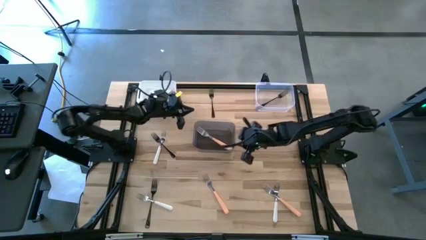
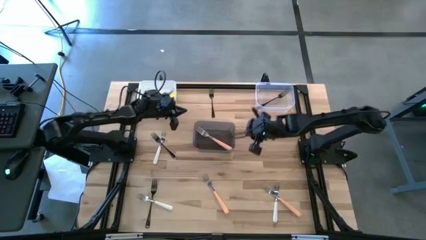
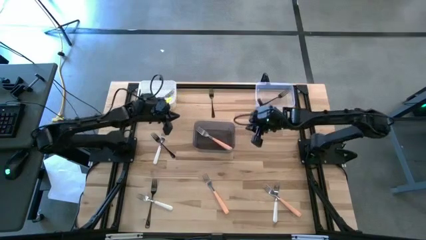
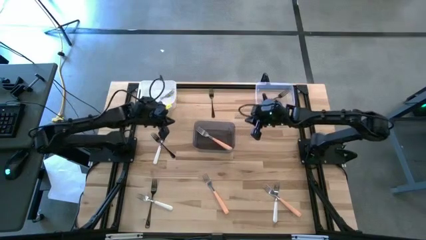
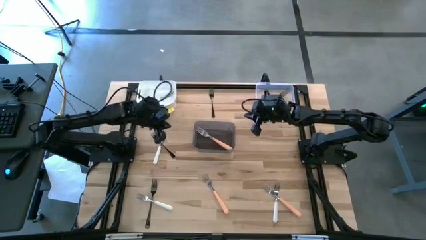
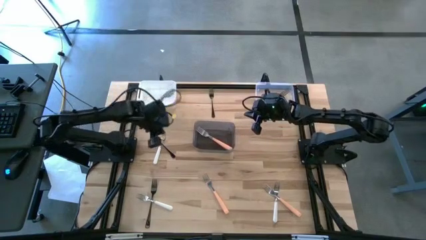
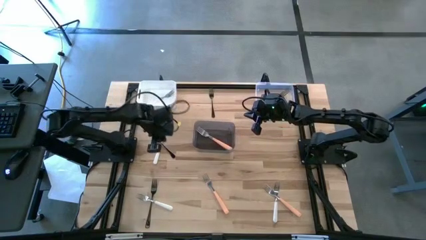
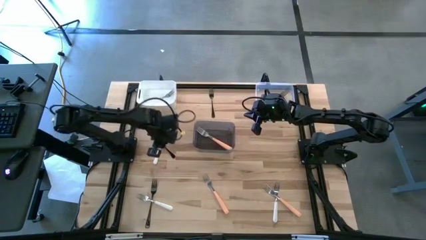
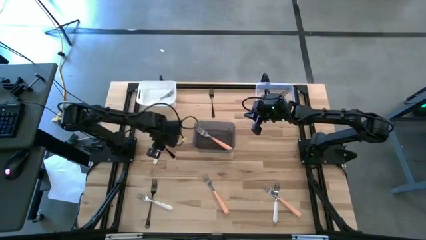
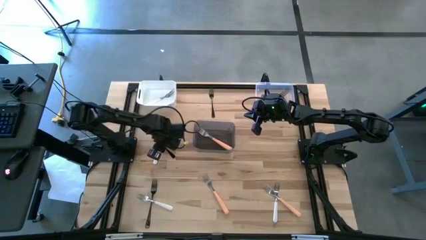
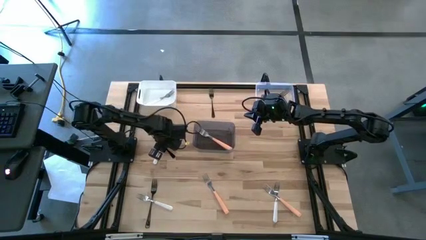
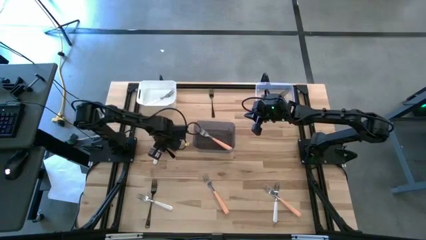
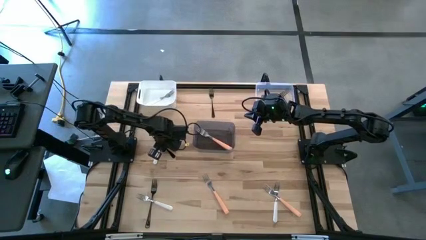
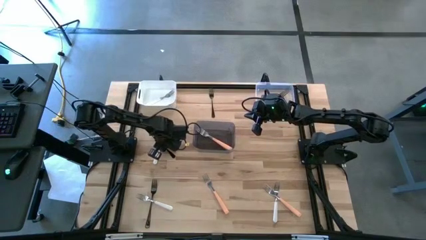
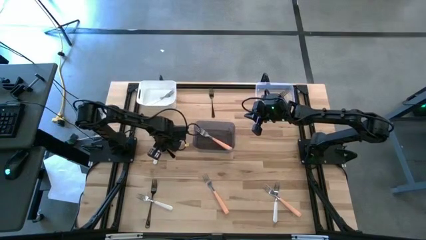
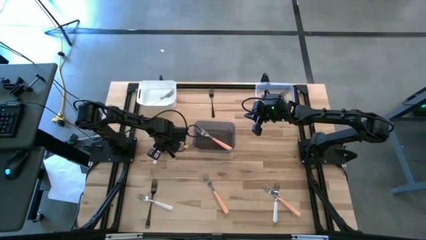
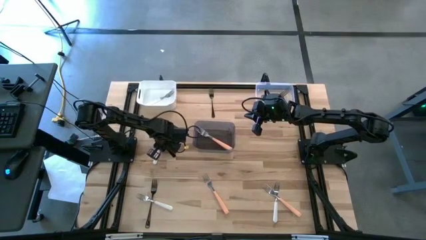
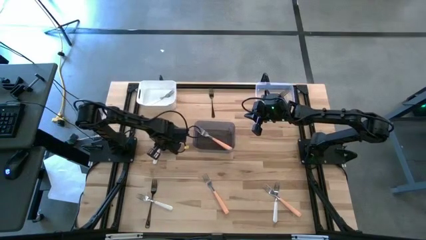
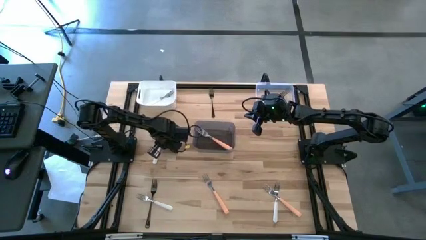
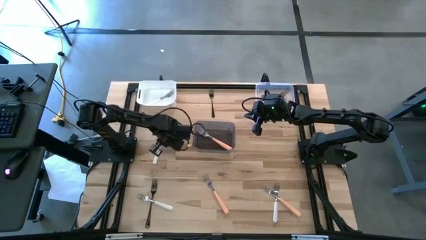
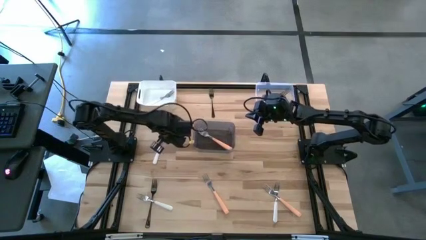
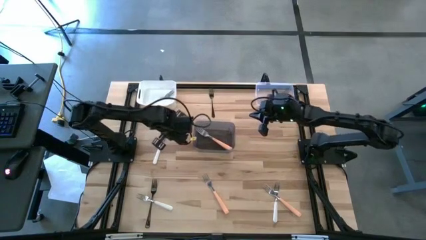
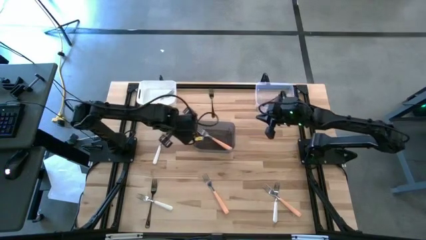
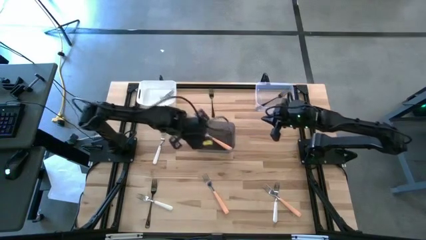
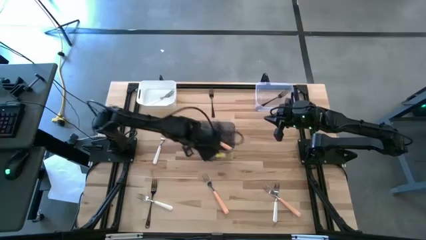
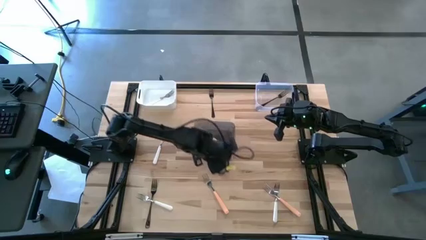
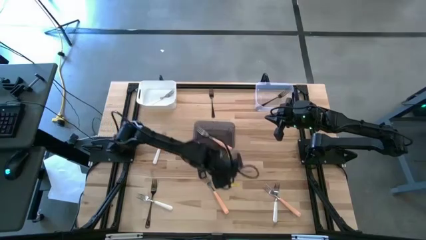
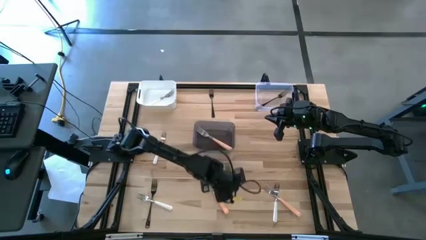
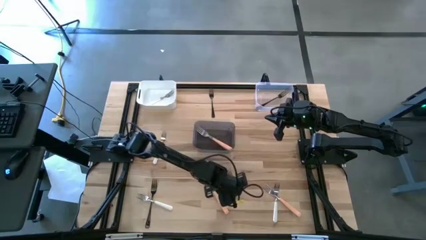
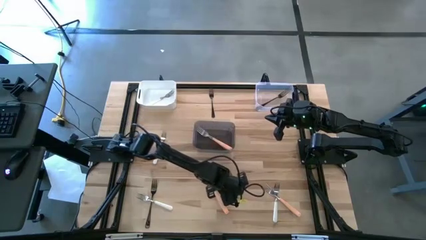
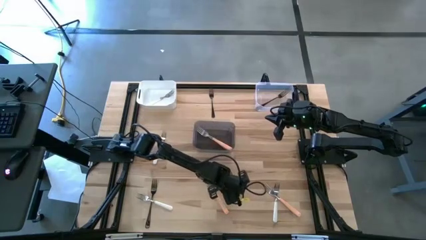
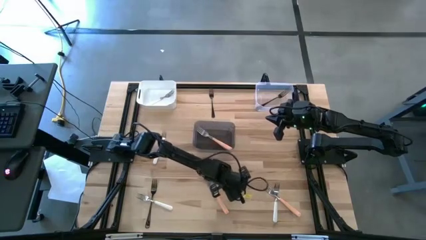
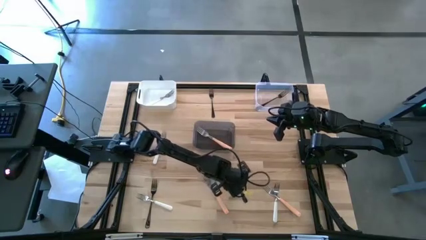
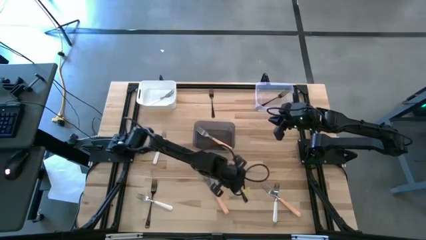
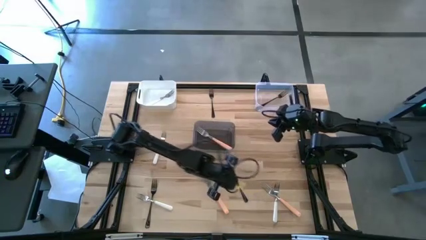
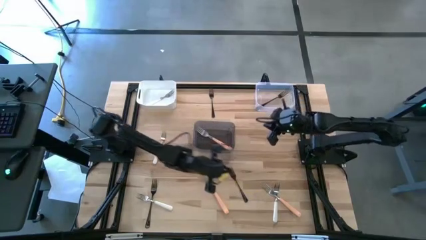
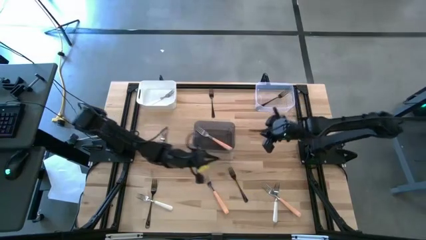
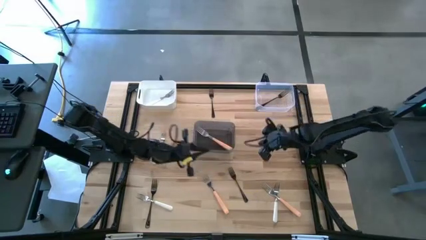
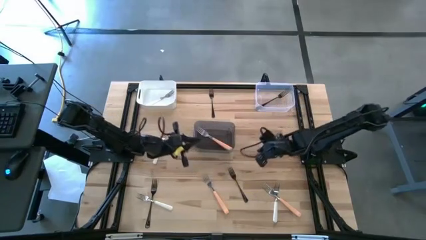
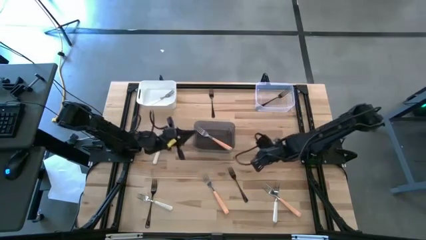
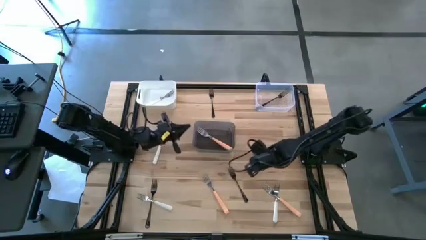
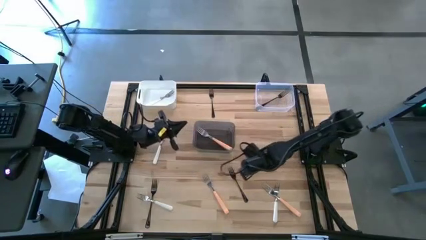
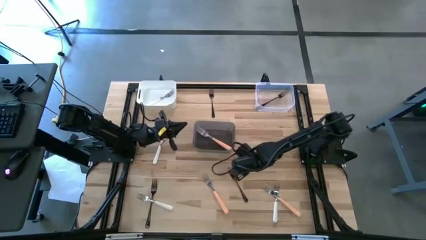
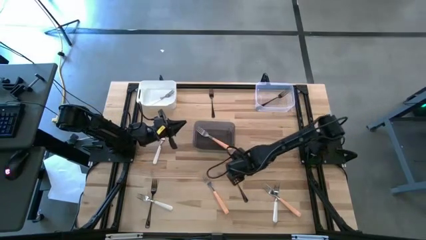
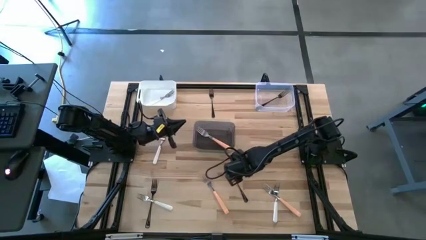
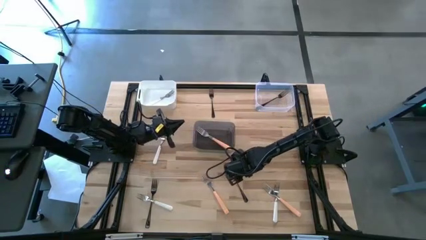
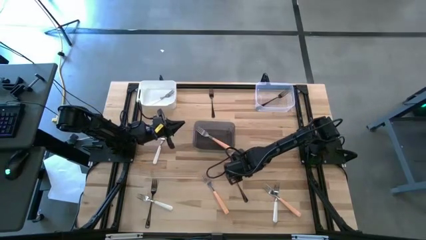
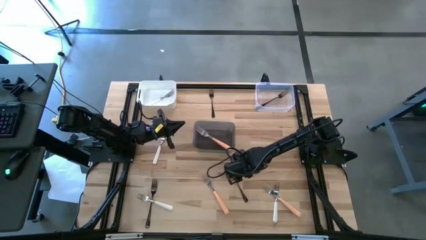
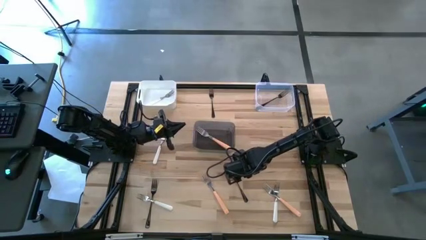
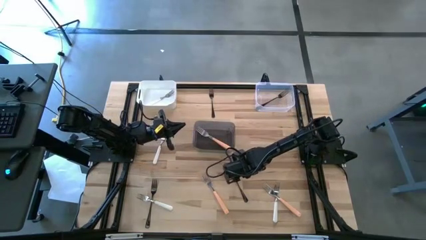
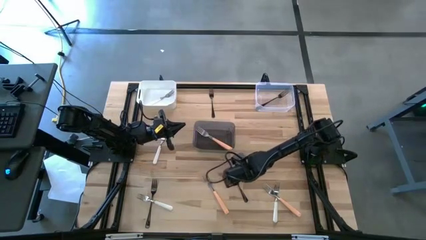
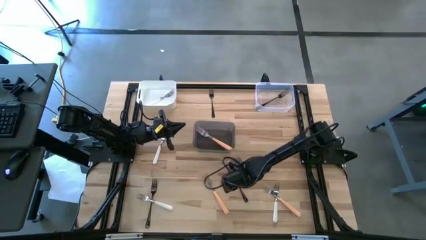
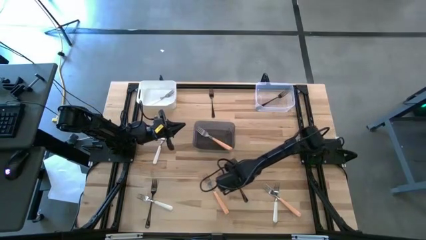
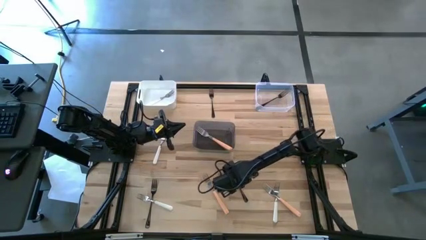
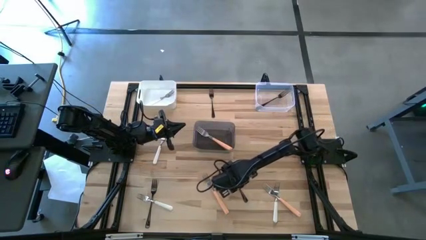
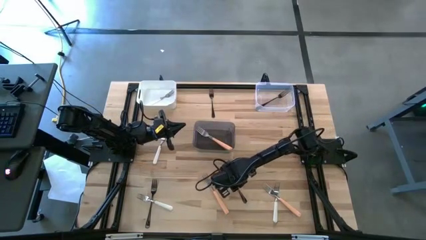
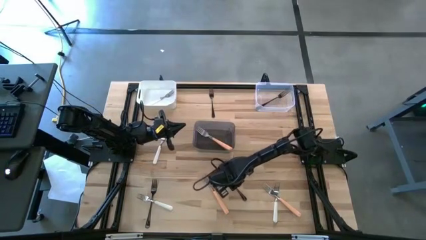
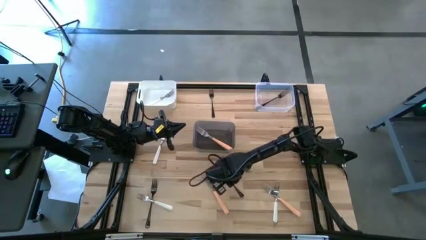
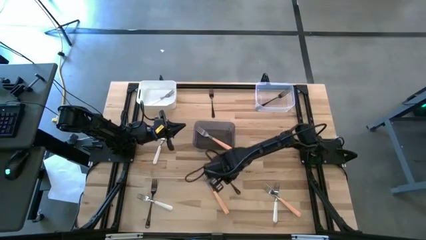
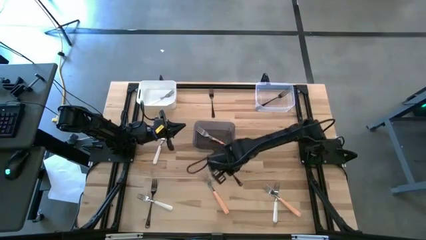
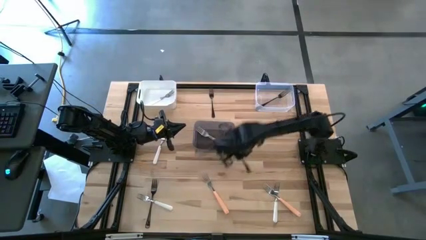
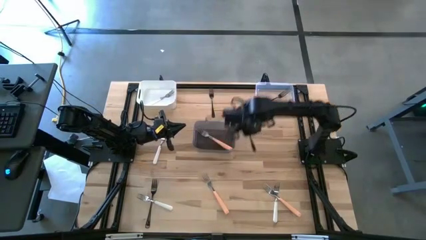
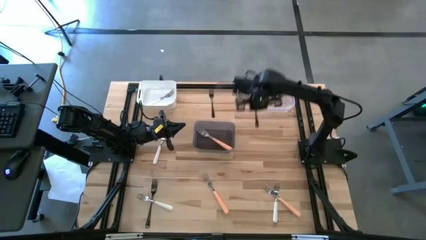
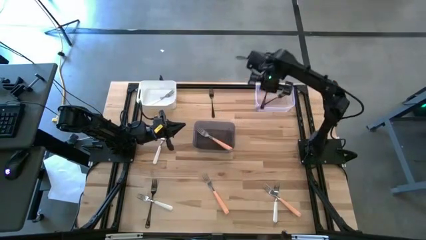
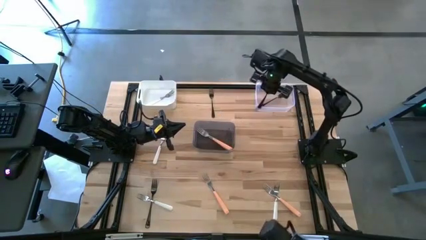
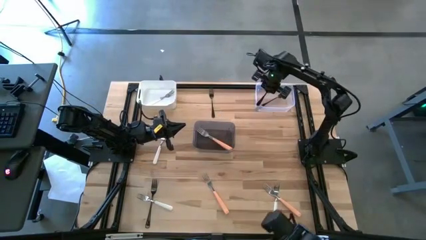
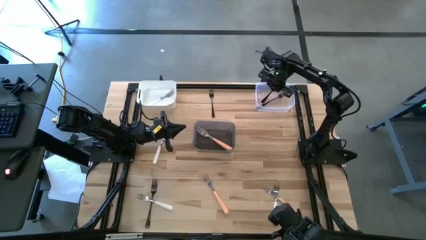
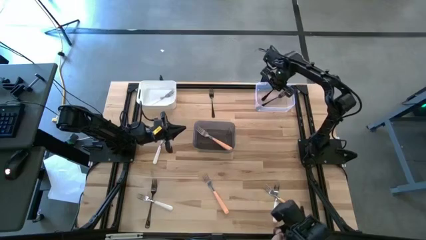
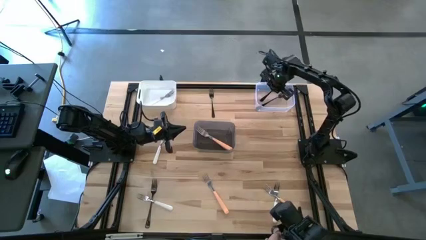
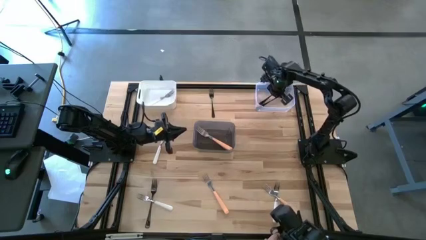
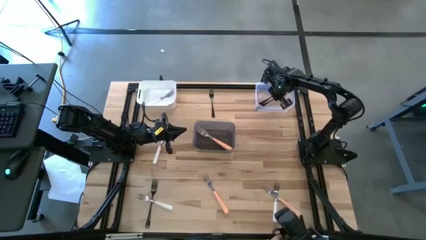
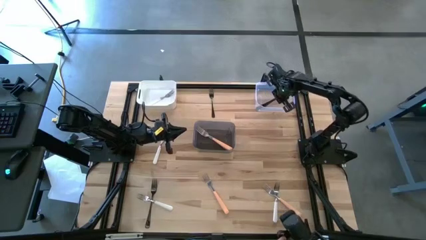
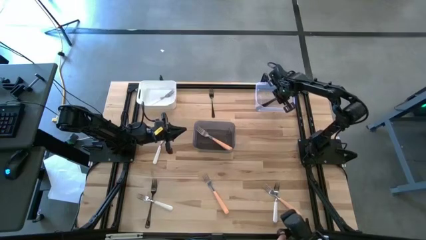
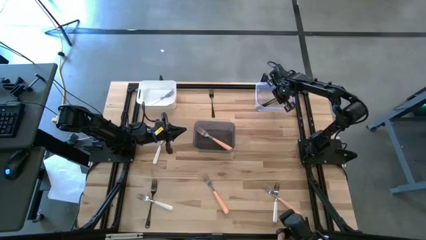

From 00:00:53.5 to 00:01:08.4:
Task: Sort silverware by color (type)
Put the middle black fork into the transparent bin
